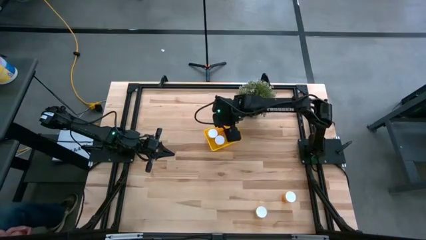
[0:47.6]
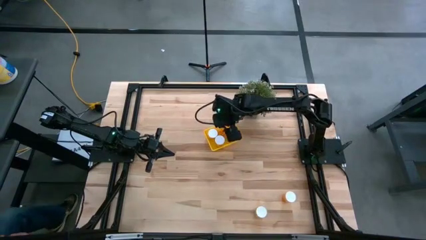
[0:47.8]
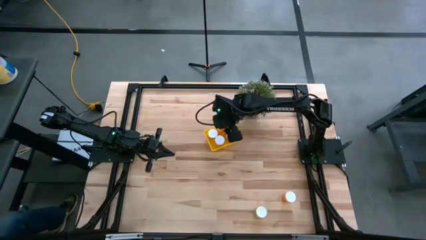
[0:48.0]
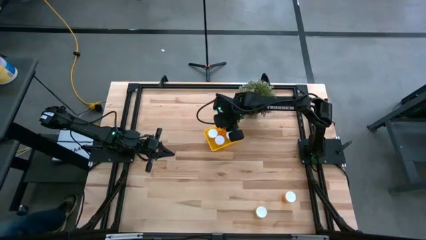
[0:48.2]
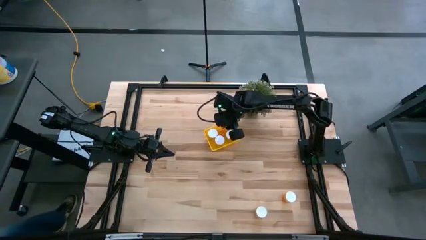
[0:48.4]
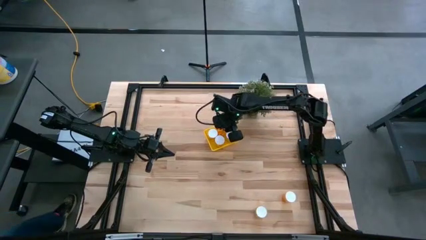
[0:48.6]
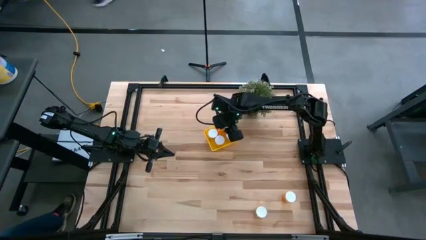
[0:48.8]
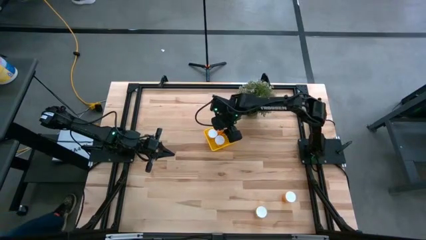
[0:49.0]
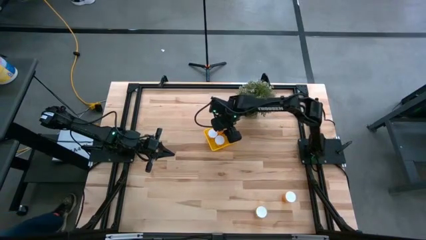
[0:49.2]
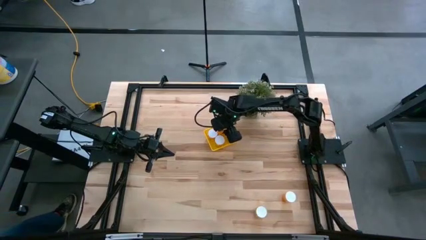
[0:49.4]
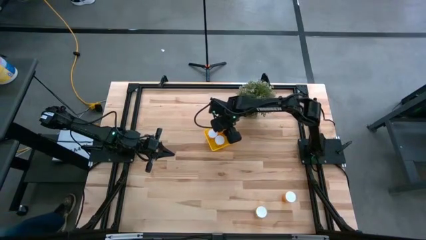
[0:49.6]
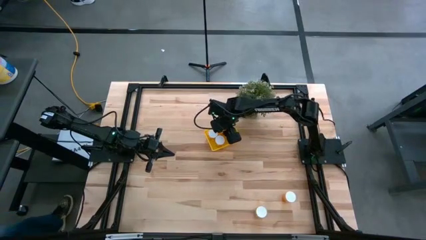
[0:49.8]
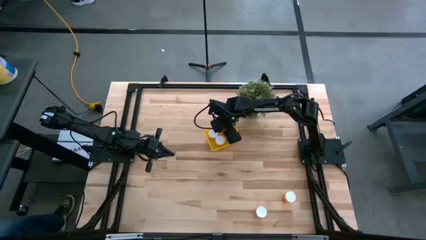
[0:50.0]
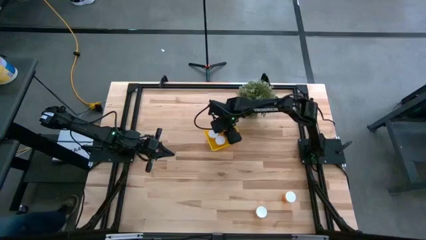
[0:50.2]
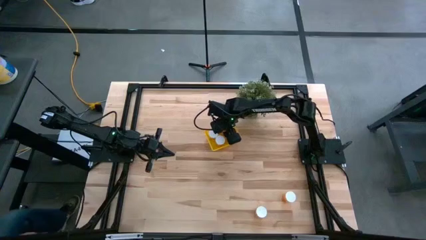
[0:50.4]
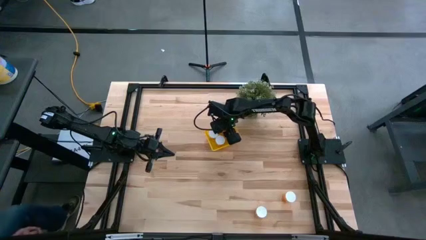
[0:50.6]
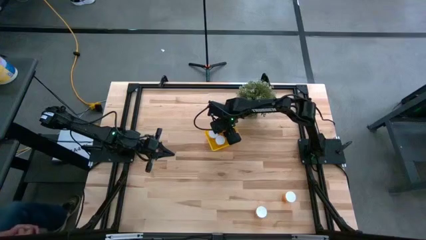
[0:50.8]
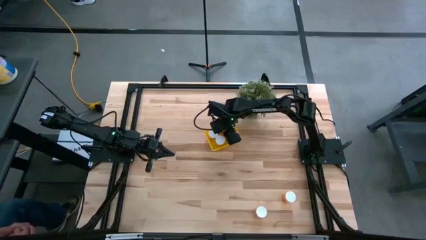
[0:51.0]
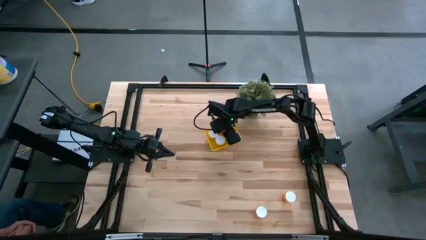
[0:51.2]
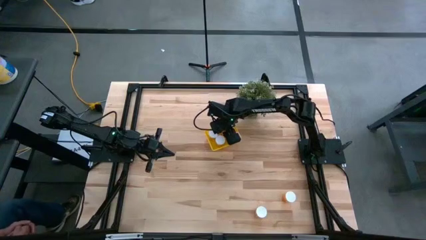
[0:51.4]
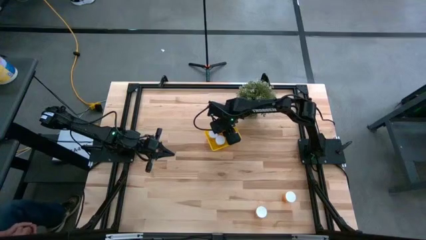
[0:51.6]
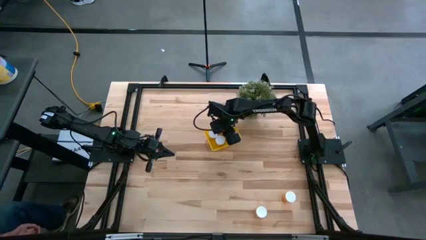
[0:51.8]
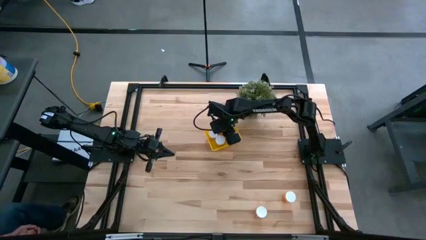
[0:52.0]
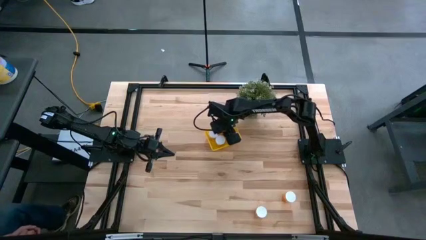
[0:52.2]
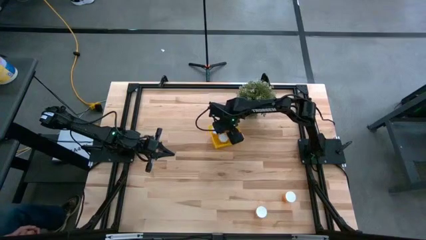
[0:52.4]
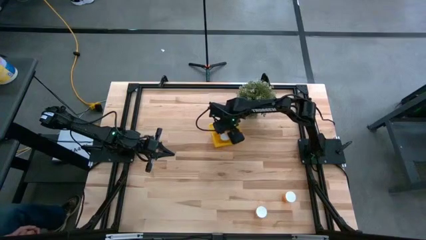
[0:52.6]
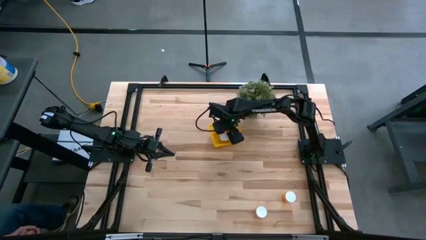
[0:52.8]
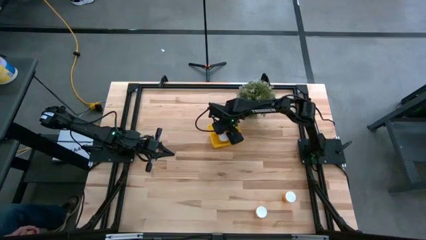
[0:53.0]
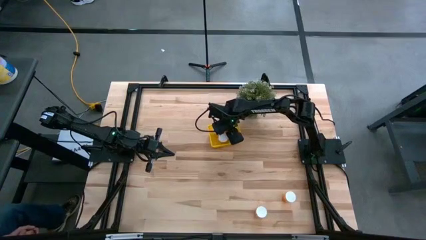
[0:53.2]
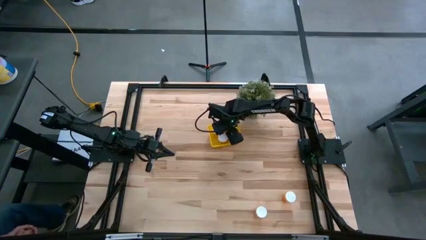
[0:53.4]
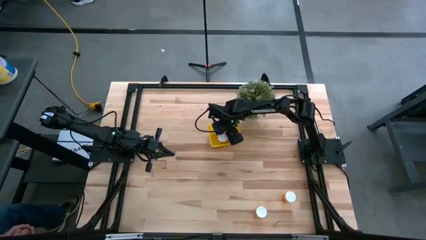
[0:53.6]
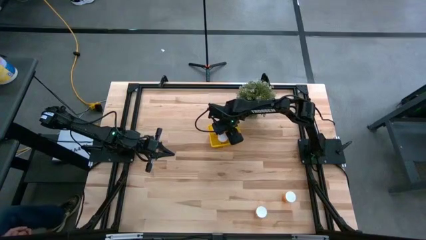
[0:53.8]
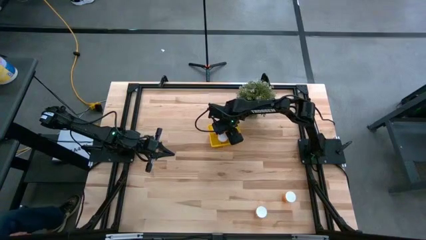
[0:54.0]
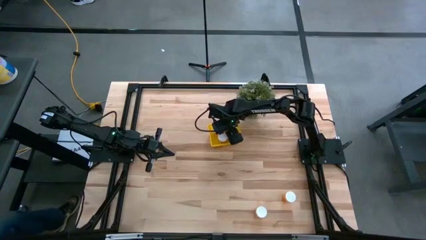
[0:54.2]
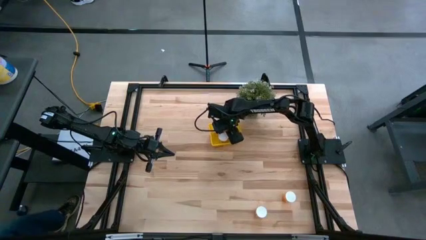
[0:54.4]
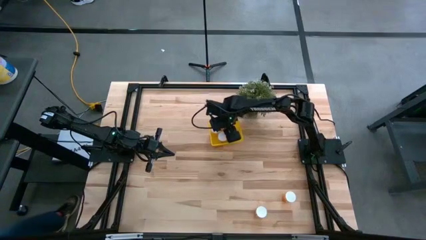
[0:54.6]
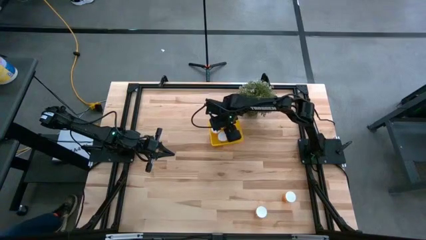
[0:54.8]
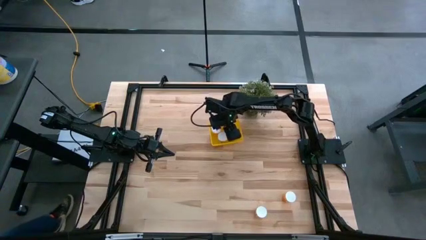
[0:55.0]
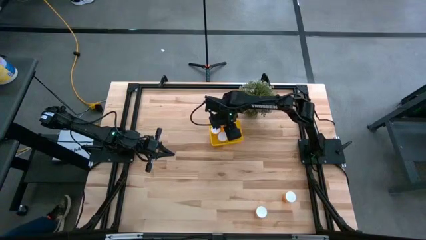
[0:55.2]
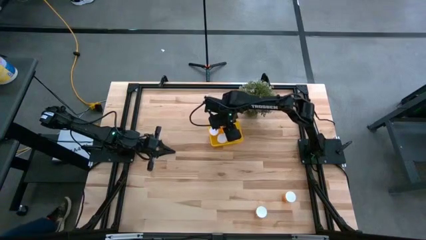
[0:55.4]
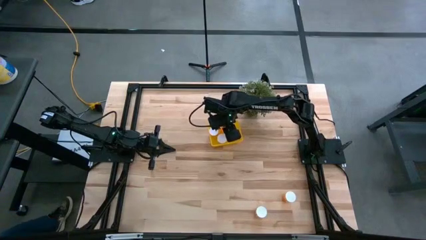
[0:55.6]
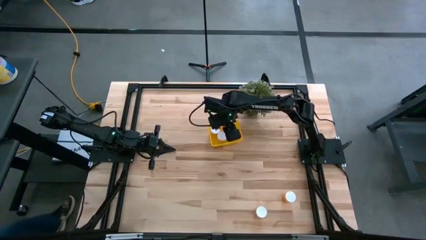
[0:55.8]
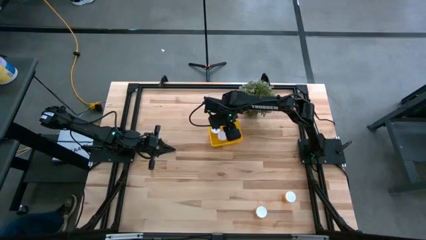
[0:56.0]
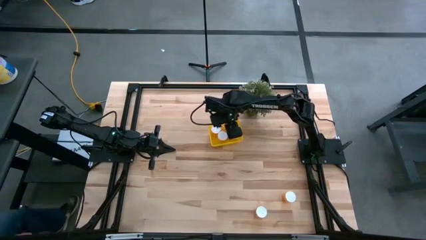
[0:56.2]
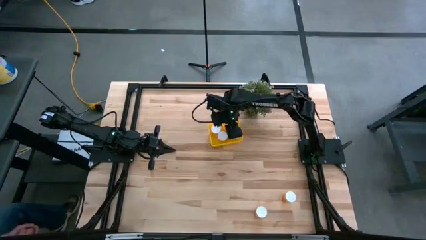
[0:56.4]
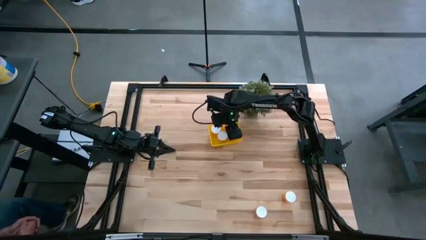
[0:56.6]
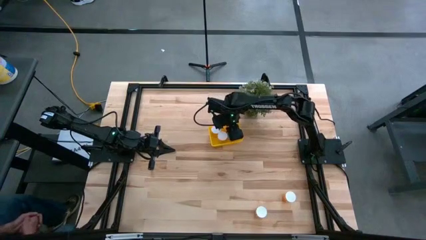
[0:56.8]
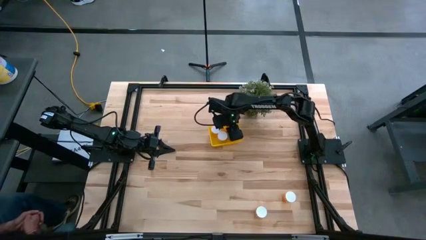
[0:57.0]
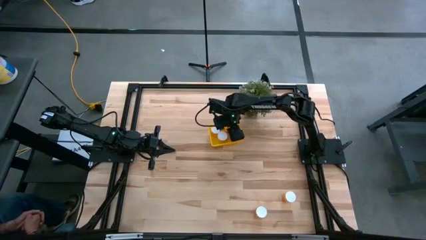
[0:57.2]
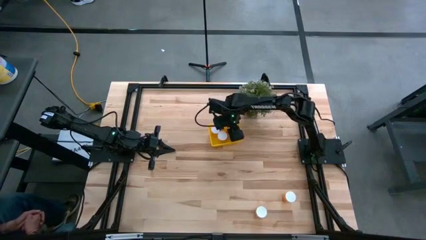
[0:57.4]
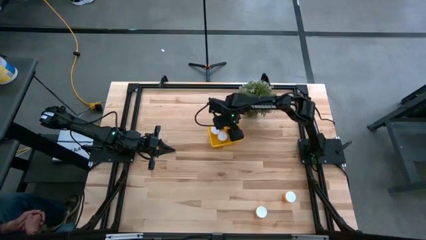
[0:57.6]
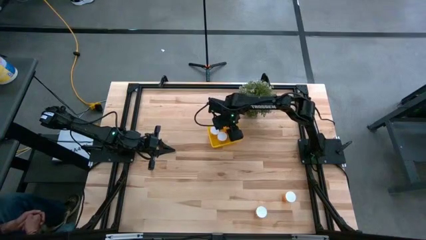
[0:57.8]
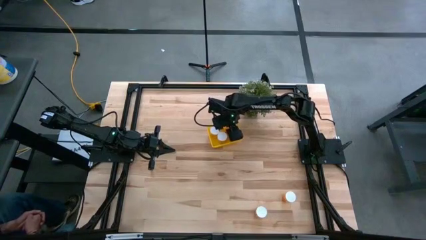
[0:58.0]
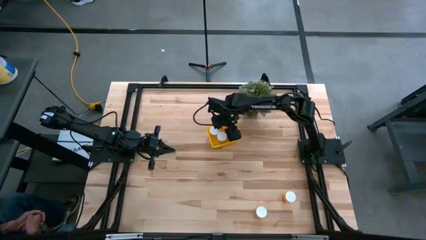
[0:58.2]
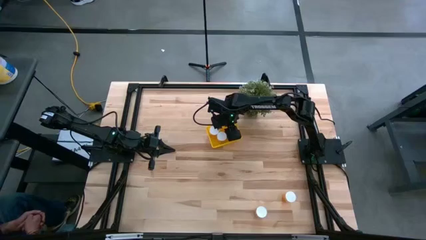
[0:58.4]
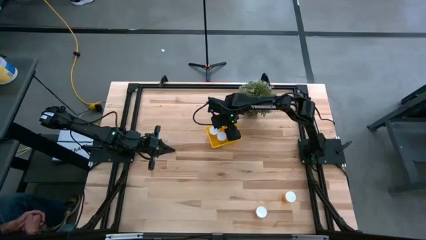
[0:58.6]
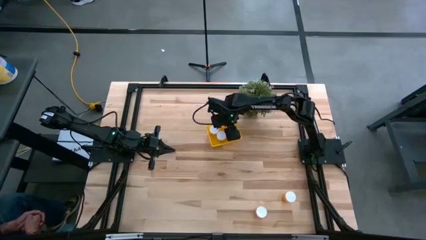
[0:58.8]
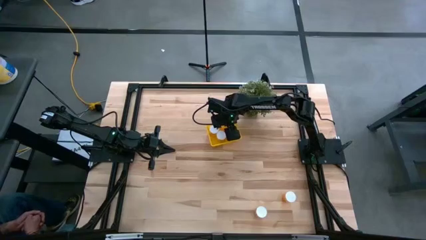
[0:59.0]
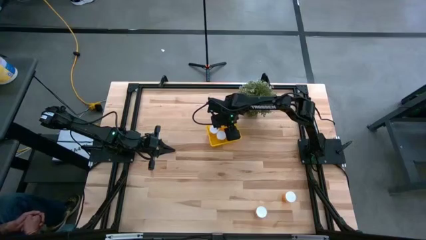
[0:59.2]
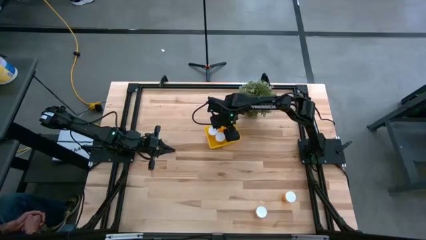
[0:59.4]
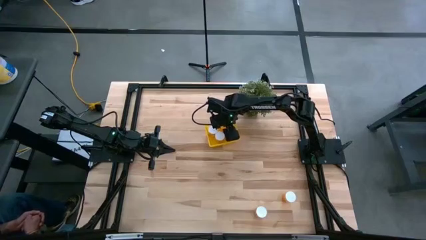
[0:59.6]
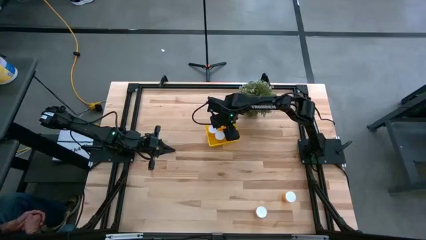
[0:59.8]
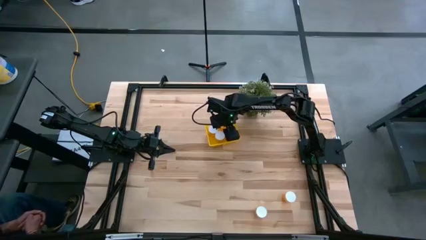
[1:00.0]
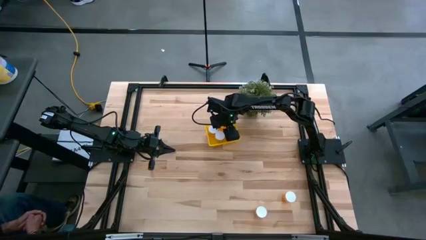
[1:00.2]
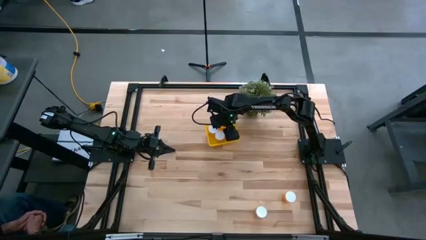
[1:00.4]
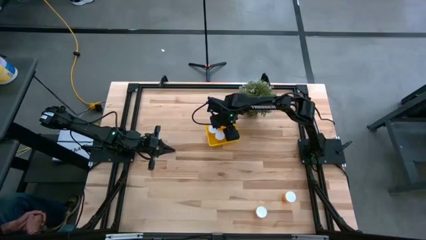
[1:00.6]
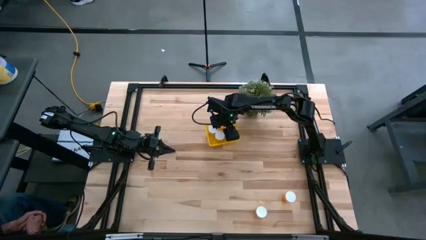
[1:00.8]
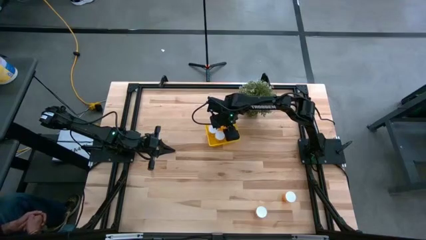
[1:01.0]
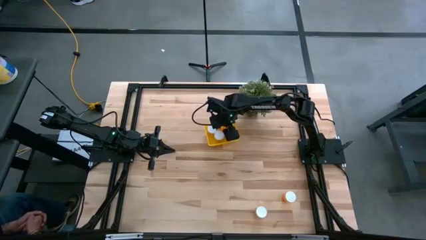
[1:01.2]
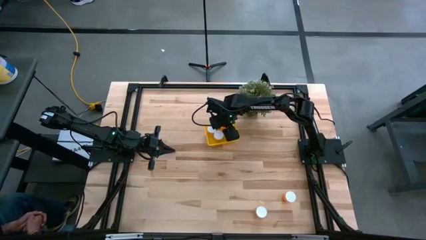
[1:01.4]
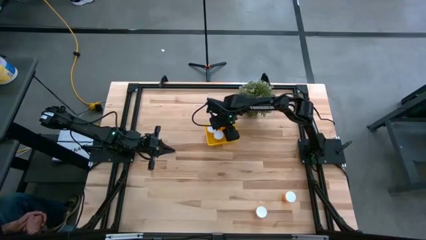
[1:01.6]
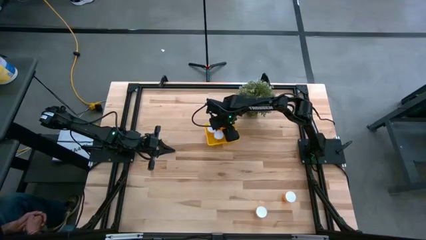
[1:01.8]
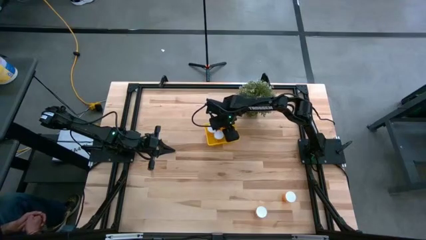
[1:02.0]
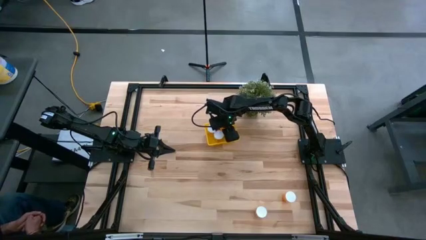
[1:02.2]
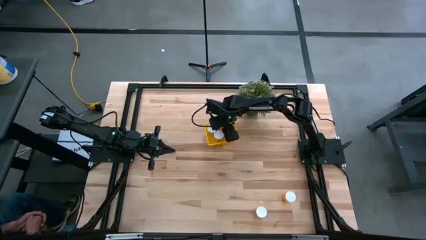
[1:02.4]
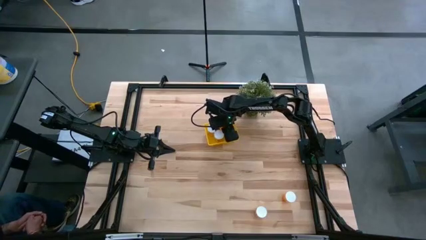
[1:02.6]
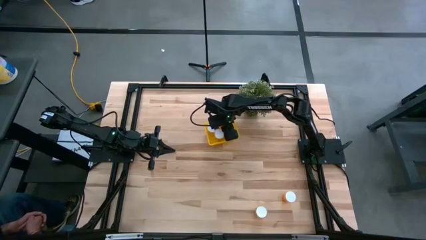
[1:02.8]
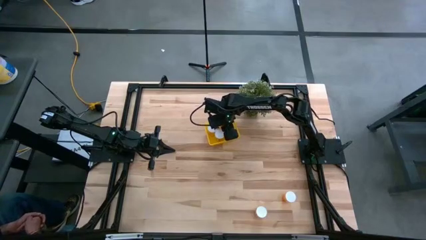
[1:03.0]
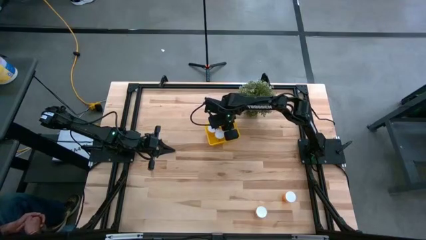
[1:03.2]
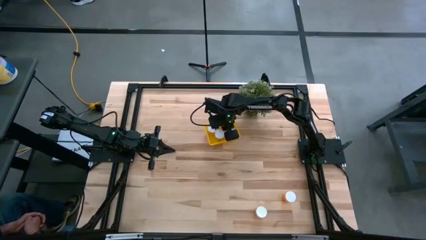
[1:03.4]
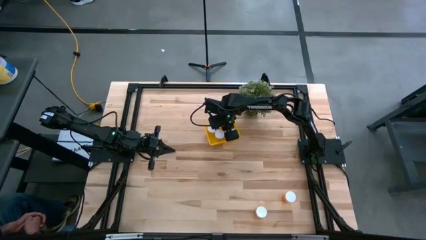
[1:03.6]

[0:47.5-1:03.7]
Task: Pick and place pill bottles into a basket
Put the orange pill bottle into the yellow bin
